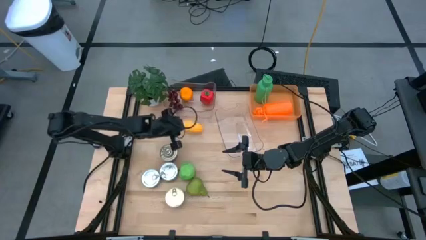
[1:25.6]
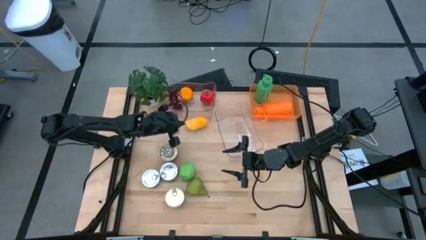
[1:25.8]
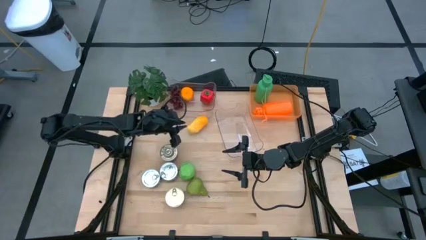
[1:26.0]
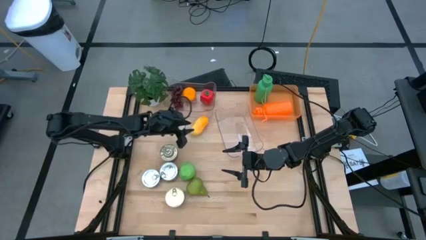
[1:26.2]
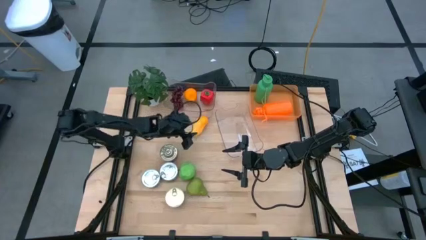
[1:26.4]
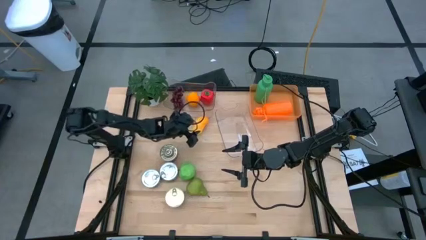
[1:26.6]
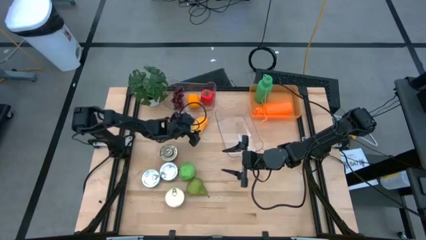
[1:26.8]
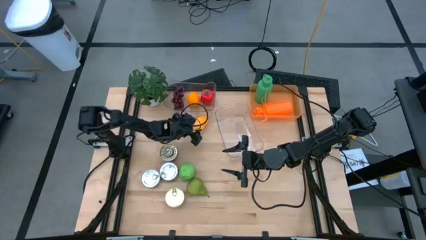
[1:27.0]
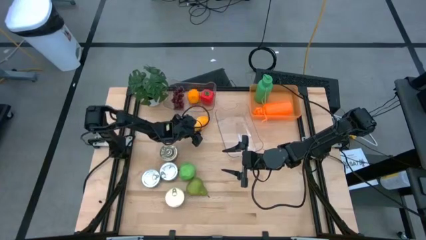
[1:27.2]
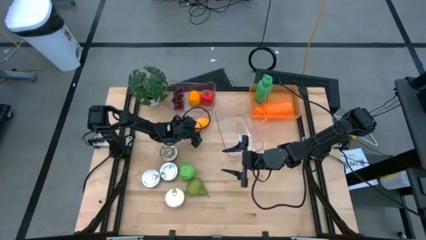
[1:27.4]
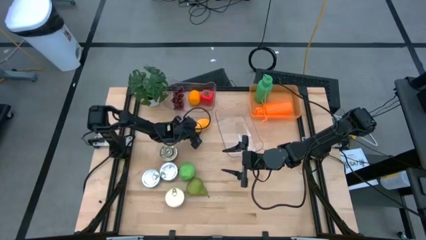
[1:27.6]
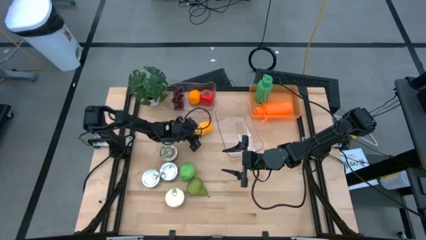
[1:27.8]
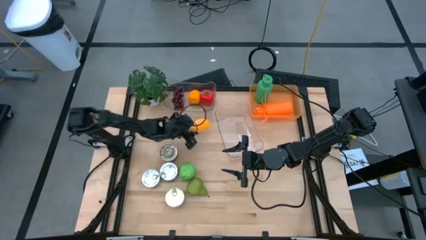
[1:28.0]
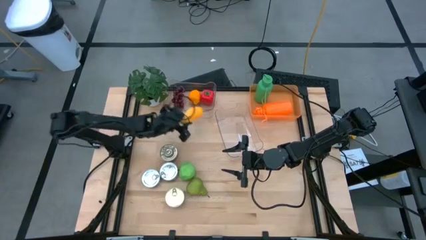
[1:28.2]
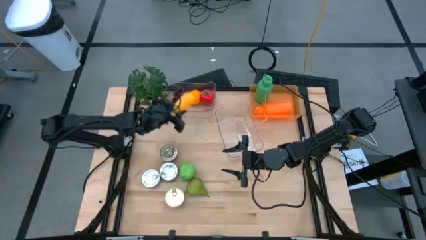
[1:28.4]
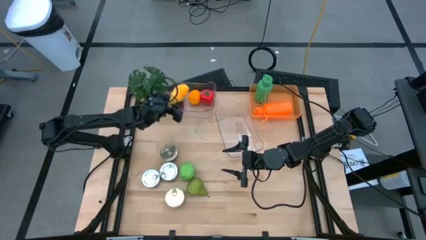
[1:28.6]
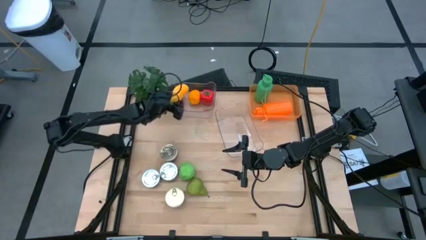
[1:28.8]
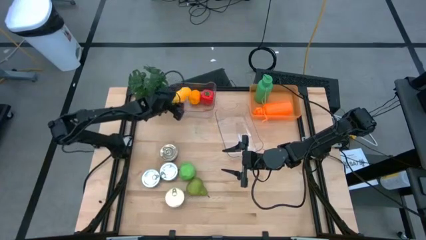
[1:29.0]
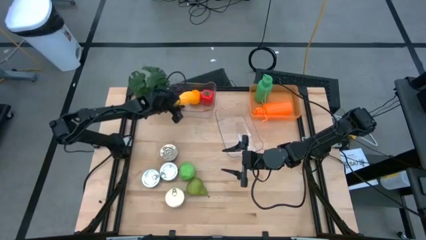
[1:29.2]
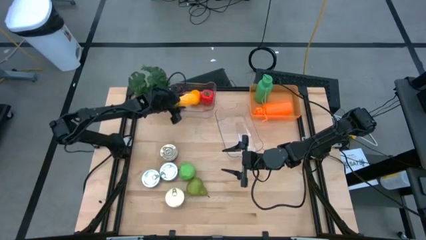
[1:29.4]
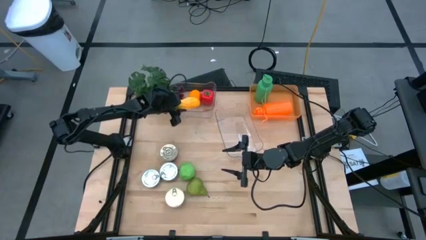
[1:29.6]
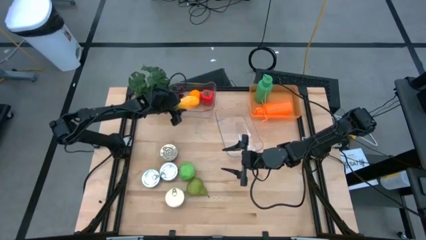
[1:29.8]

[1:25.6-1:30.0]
Task: Pick & Place Food Item
Put the yellow mango into the top transparent bin

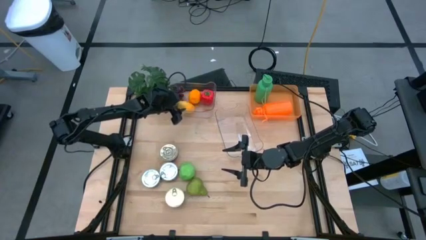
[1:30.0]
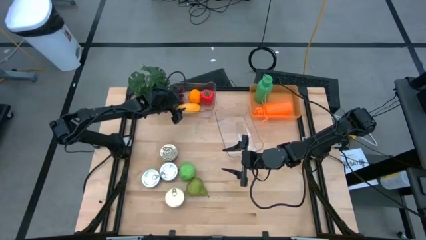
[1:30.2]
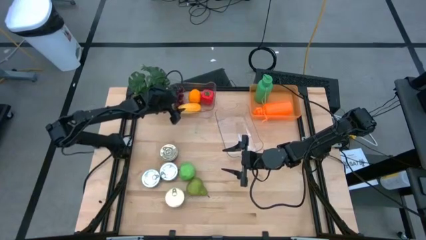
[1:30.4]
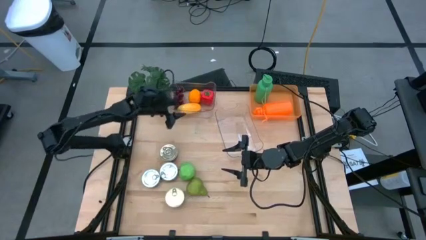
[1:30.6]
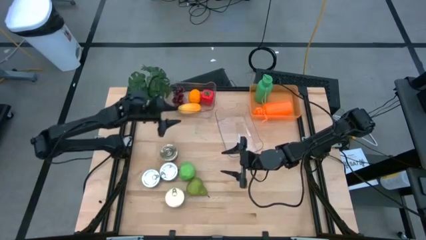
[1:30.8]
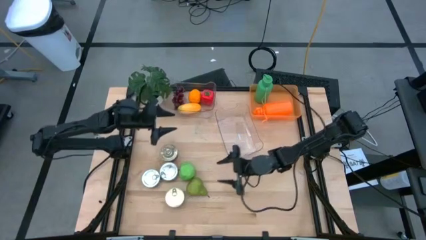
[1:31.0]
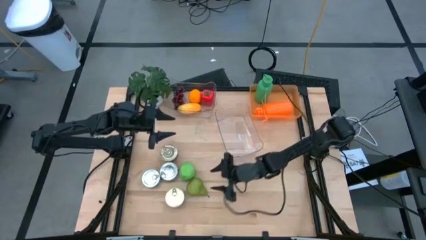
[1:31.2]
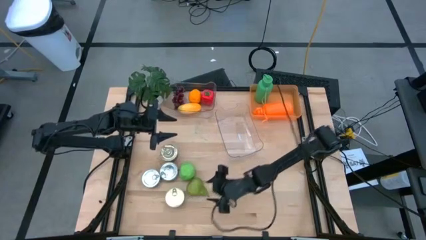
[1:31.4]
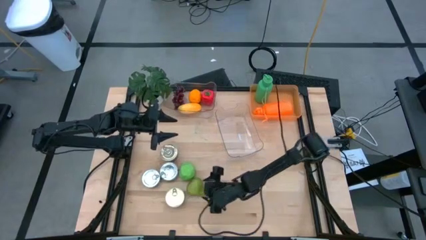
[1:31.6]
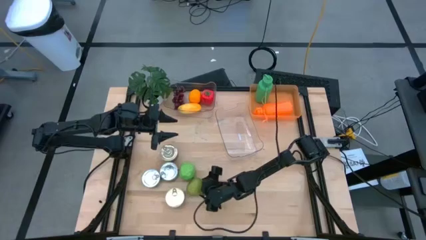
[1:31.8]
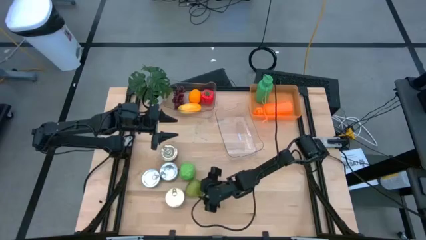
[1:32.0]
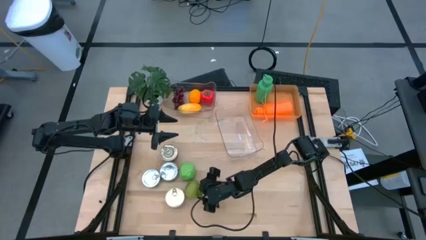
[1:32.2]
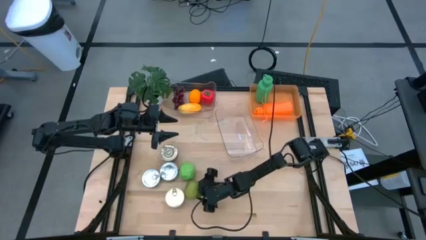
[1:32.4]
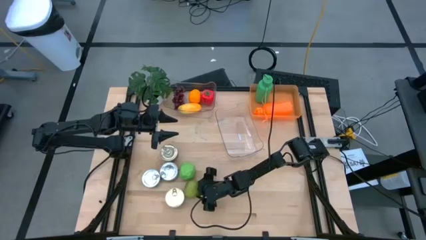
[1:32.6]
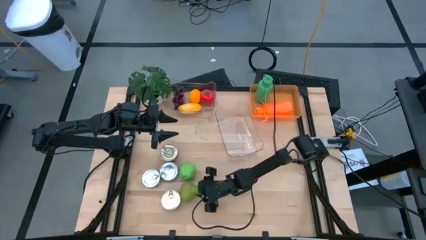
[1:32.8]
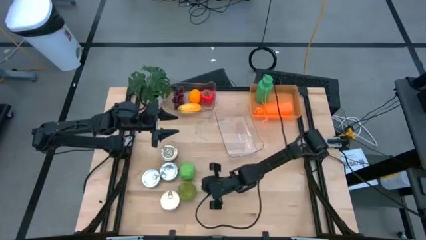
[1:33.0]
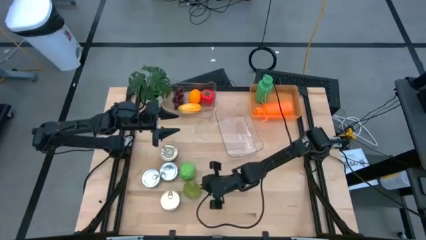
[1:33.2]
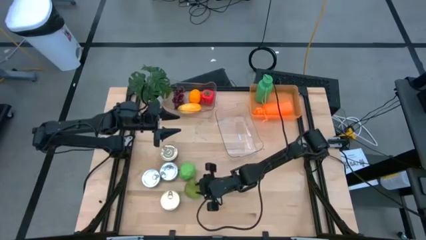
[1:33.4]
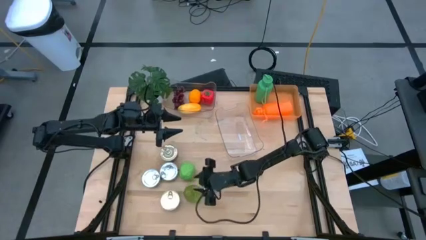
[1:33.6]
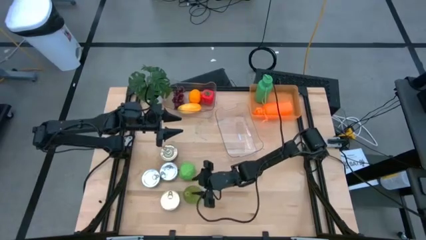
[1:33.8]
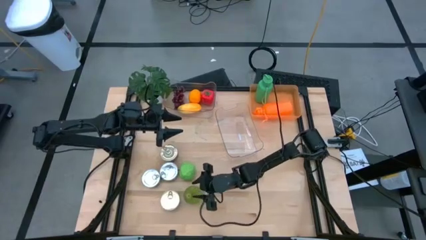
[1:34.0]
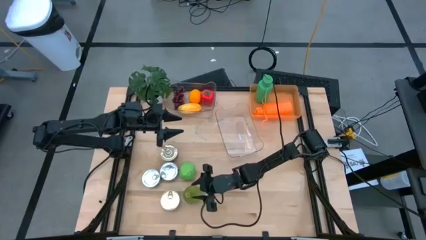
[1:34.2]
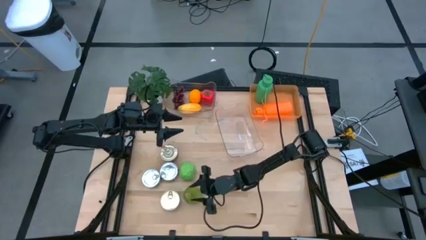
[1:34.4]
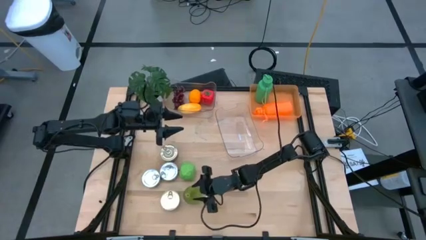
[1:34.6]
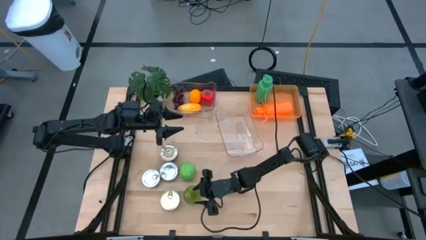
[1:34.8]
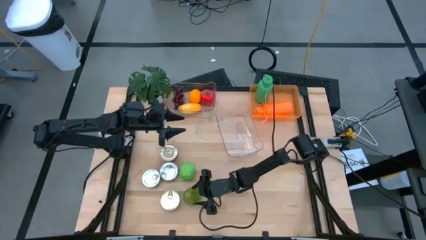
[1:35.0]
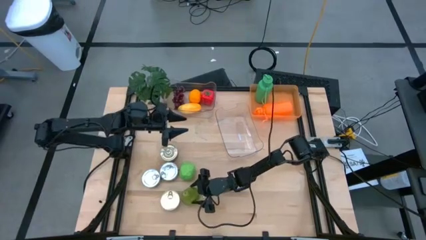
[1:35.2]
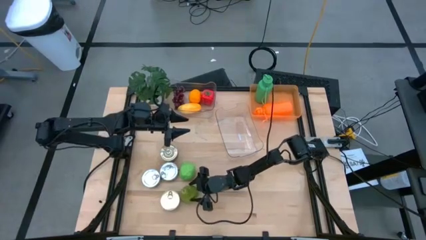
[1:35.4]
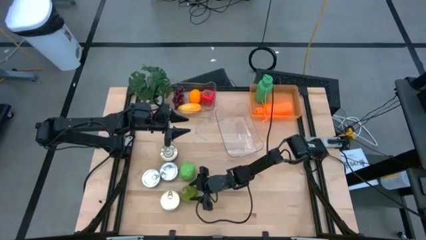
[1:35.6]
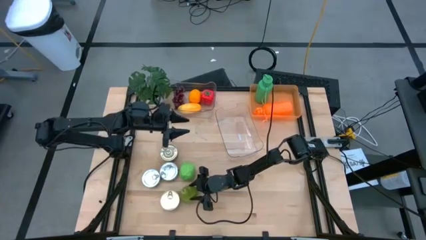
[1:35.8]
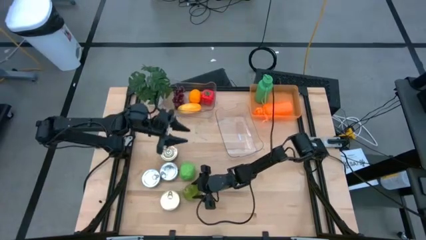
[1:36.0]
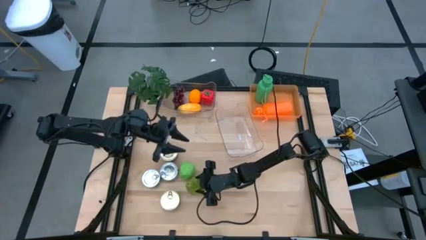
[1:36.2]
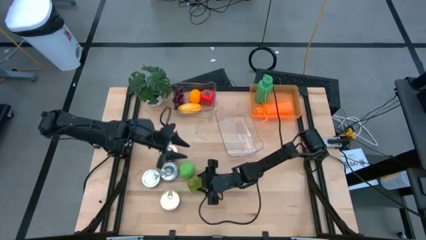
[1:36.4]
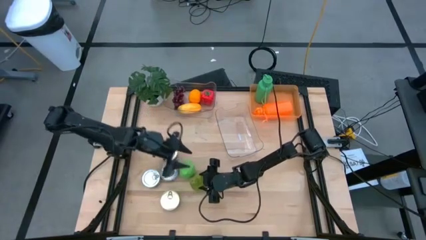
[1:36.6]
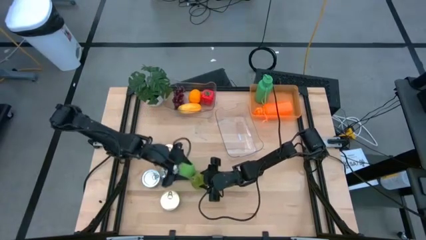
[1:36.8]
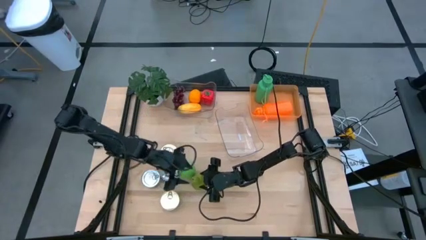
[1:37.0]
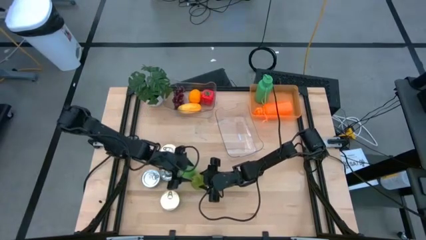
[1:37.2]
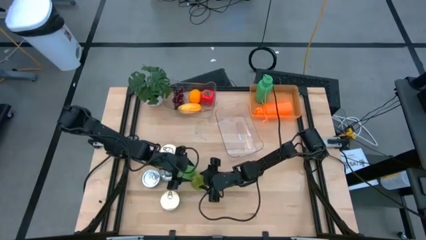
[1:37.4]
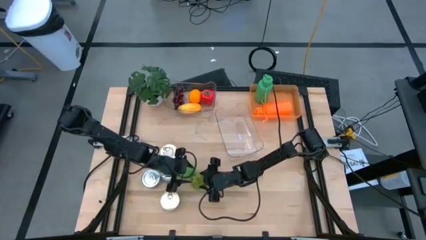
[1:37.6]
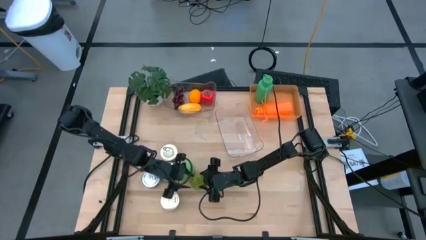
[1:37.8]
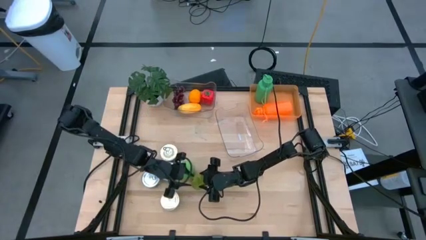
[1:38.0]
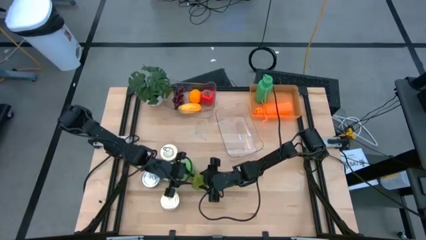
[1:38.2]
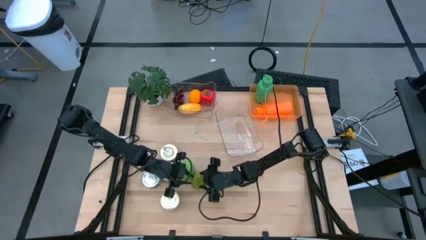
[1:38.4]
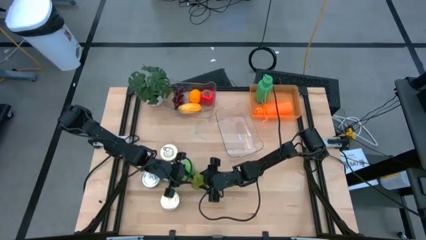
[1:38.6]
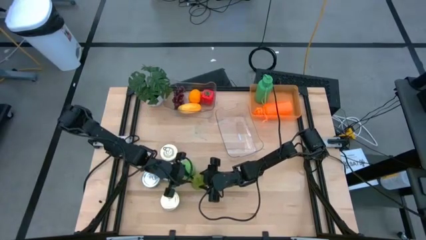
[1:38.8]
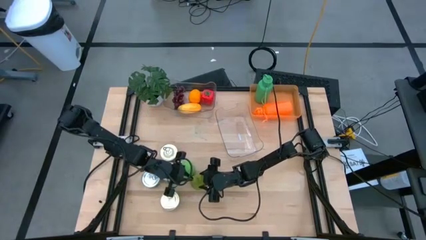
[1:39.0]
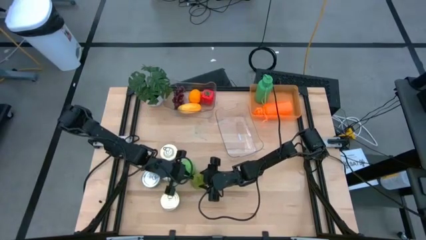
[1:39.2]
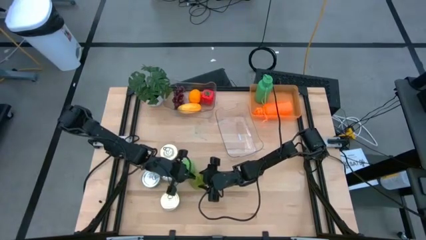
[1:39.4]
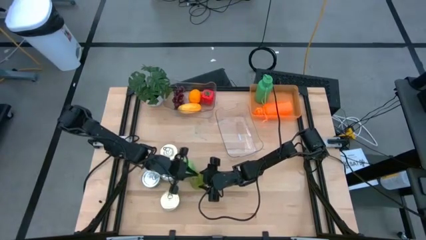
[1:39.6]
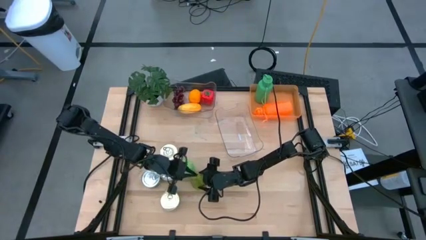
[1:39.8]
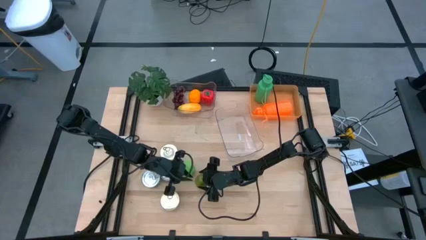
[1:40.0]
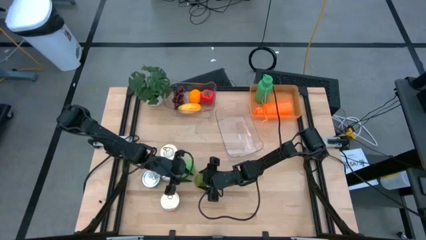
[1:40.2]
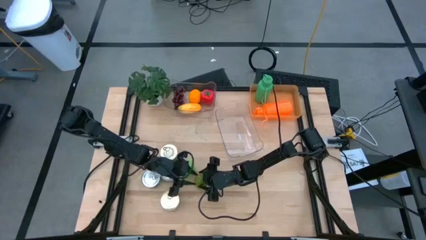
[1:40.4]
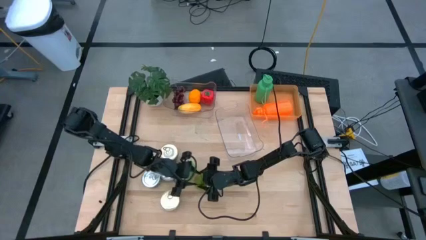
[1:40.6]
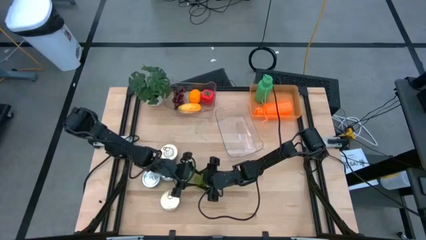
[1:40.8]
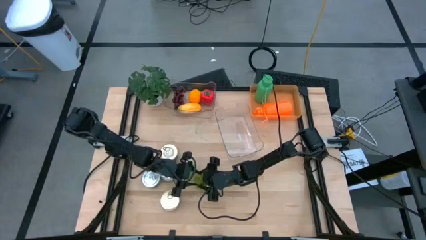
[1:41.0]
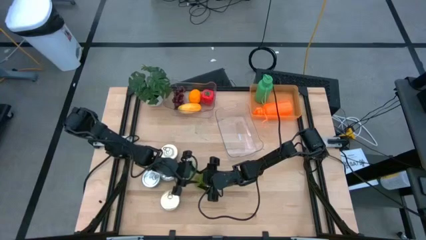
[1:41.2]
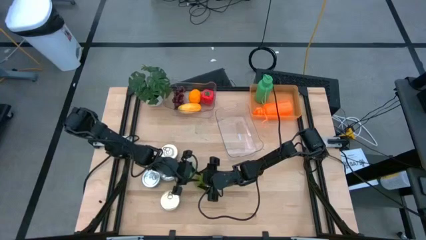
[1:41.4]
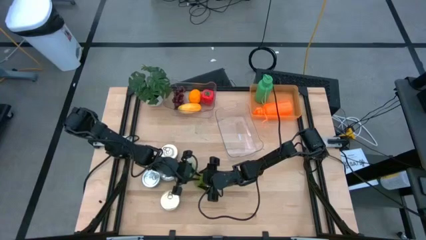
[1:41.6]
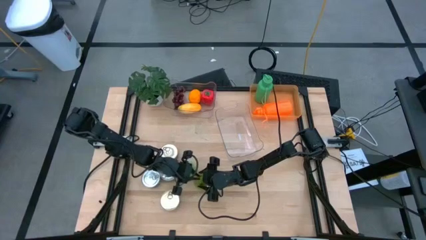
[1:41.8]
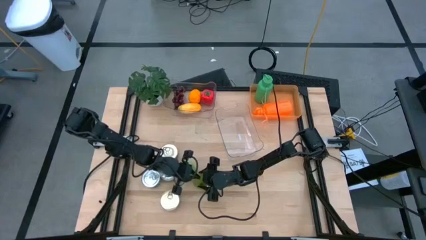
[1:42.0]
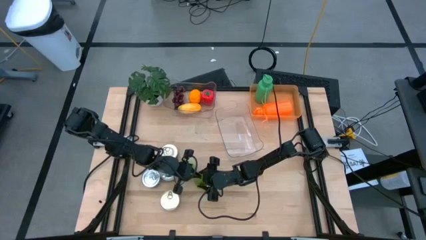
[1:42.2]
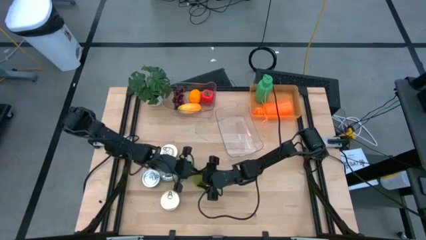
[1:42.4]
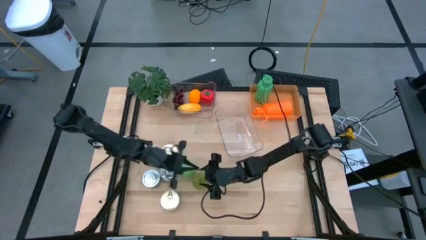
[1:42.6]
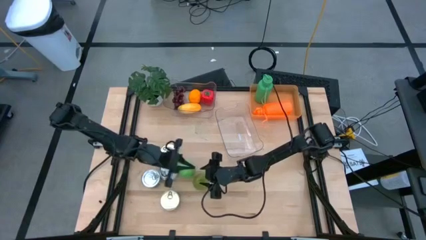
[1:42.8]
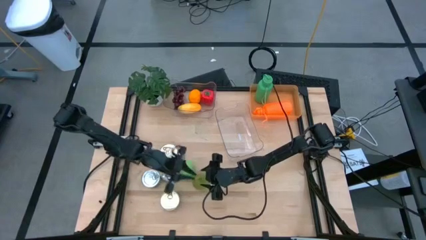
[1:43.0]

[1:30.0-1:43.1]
Put the green pear into the top transparent bin
